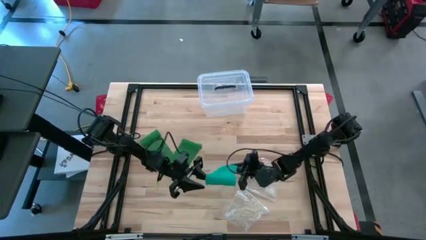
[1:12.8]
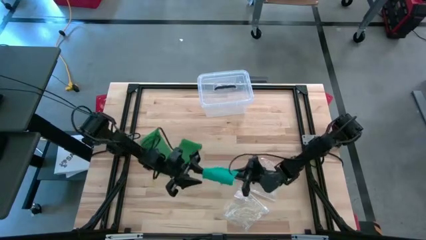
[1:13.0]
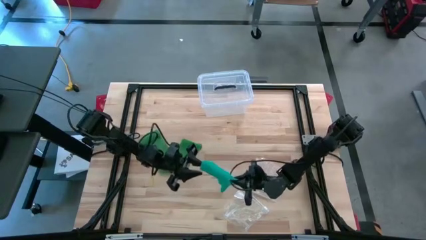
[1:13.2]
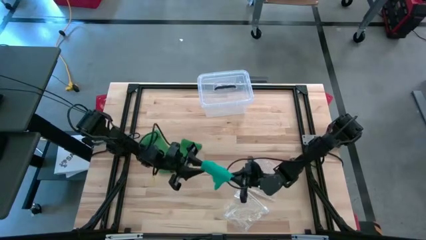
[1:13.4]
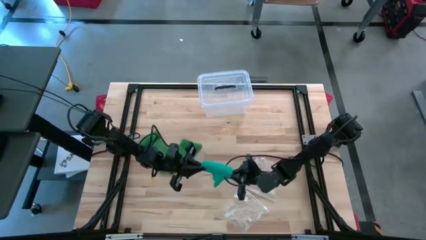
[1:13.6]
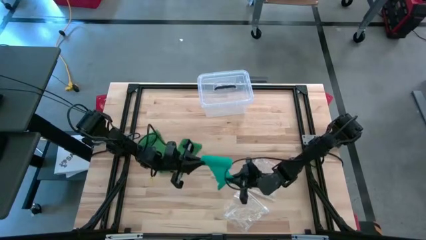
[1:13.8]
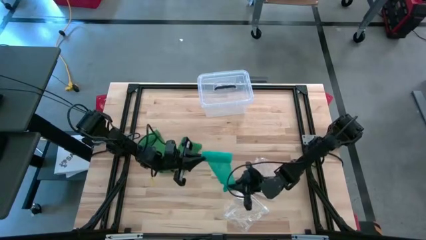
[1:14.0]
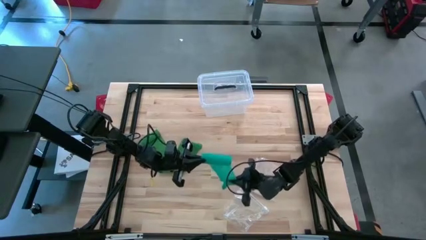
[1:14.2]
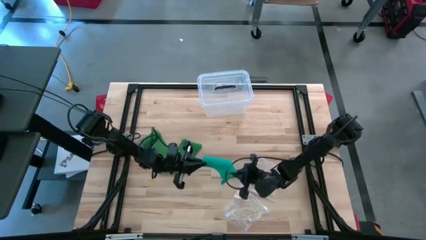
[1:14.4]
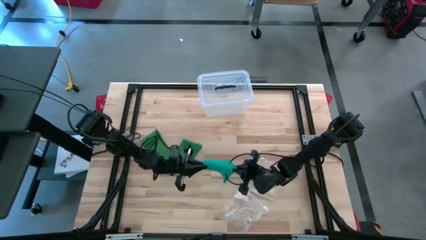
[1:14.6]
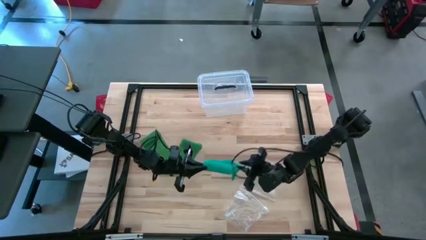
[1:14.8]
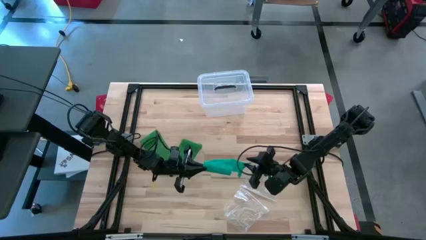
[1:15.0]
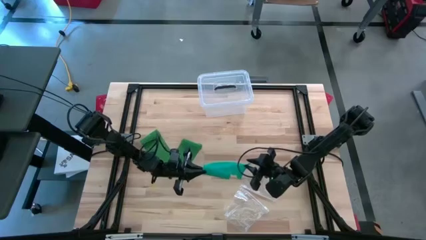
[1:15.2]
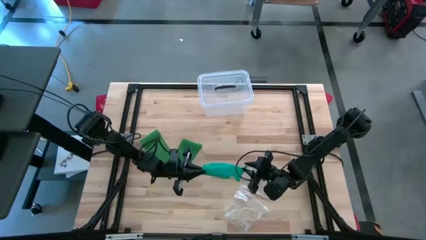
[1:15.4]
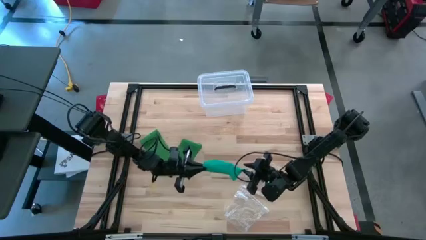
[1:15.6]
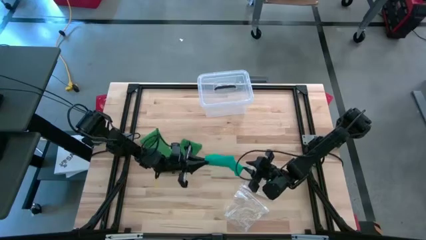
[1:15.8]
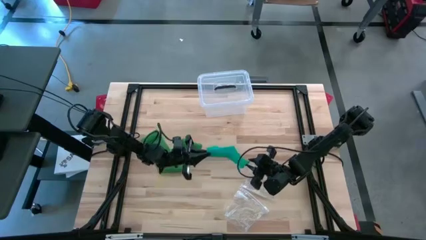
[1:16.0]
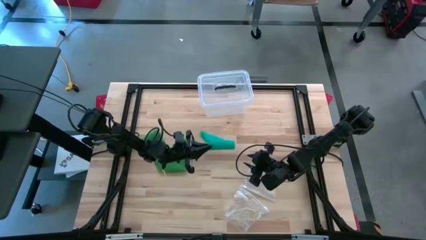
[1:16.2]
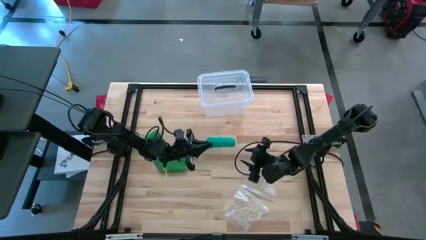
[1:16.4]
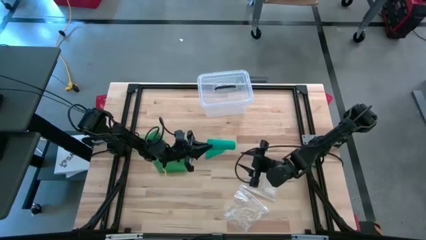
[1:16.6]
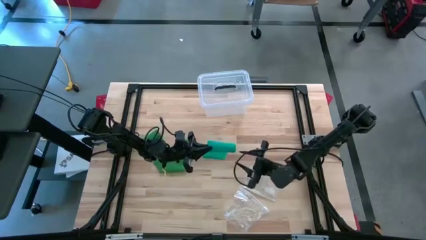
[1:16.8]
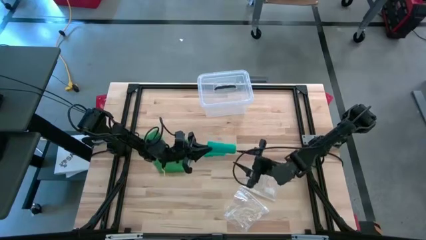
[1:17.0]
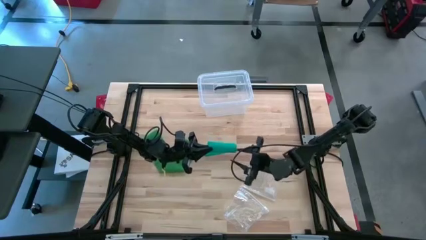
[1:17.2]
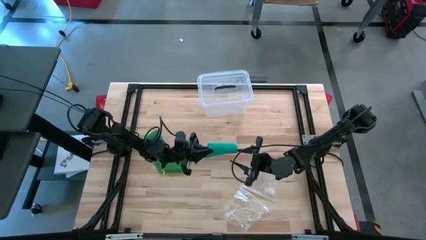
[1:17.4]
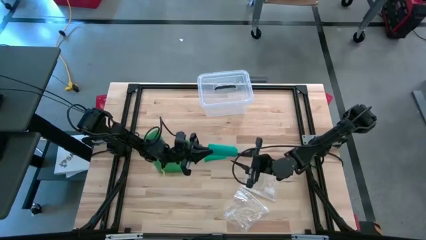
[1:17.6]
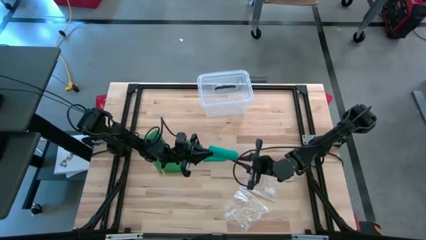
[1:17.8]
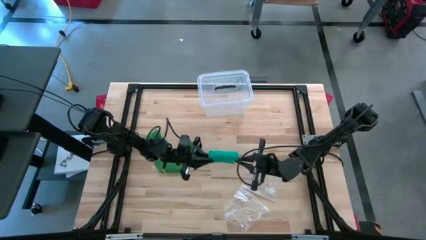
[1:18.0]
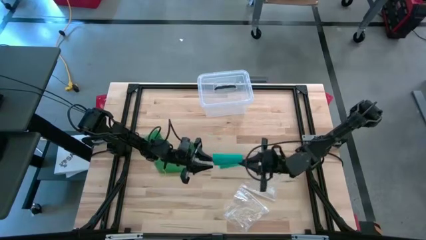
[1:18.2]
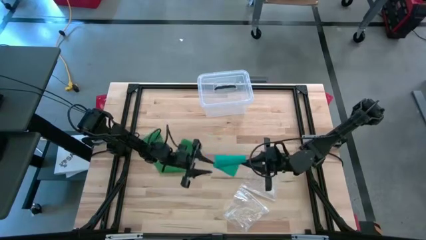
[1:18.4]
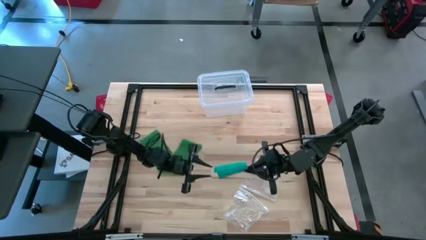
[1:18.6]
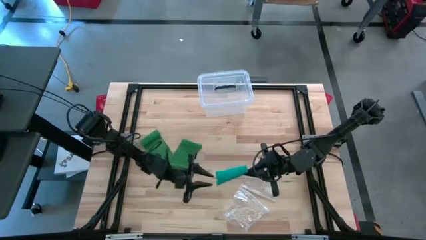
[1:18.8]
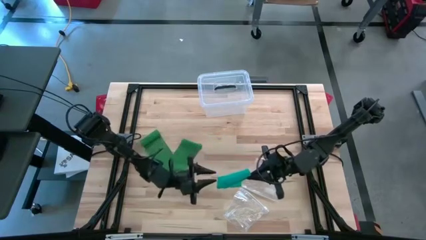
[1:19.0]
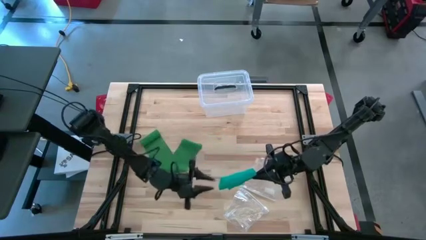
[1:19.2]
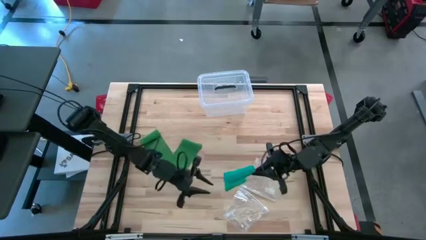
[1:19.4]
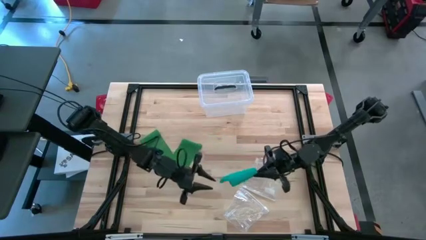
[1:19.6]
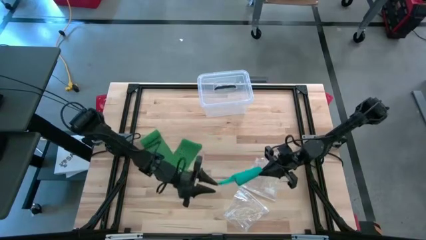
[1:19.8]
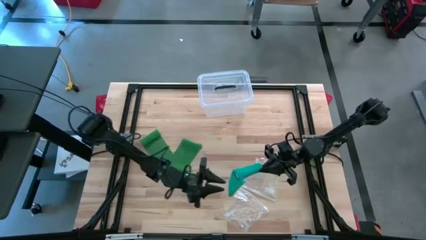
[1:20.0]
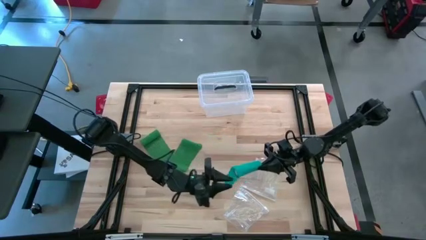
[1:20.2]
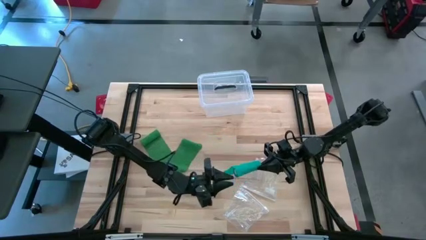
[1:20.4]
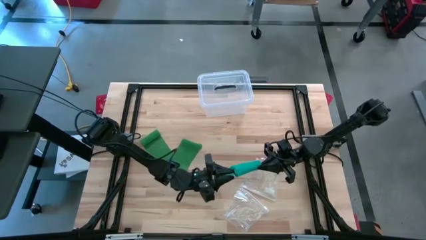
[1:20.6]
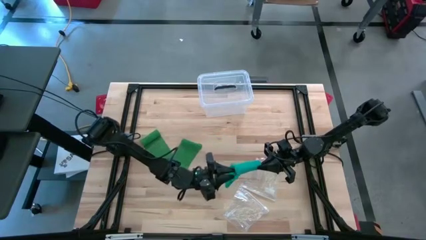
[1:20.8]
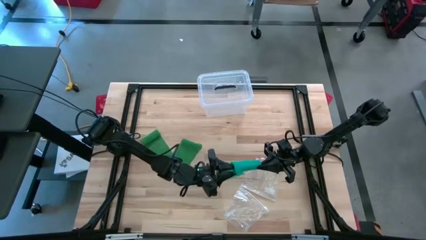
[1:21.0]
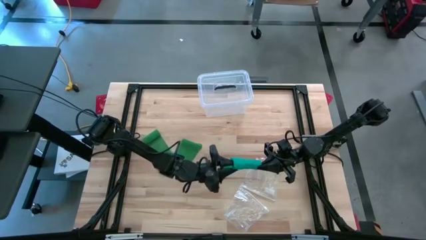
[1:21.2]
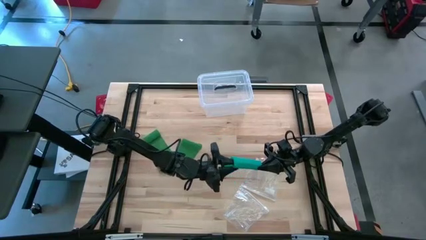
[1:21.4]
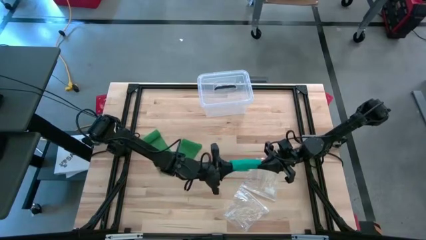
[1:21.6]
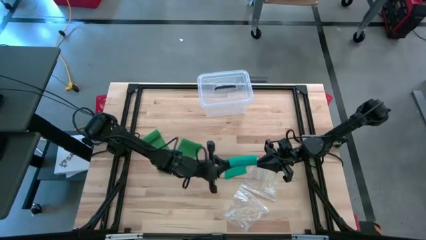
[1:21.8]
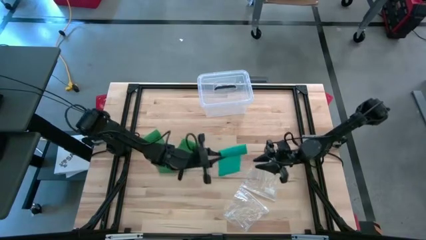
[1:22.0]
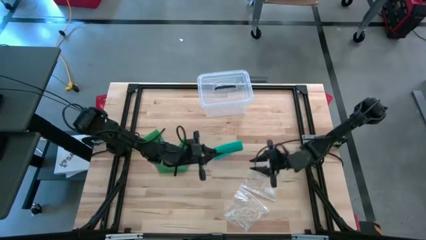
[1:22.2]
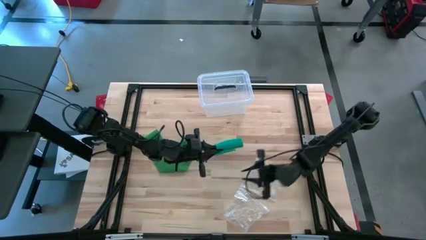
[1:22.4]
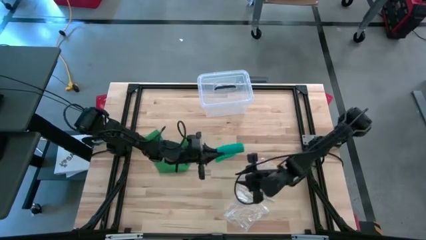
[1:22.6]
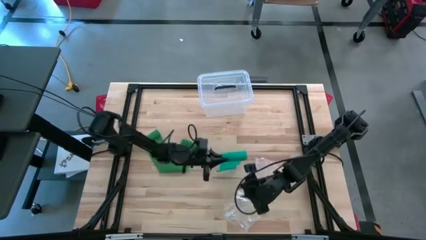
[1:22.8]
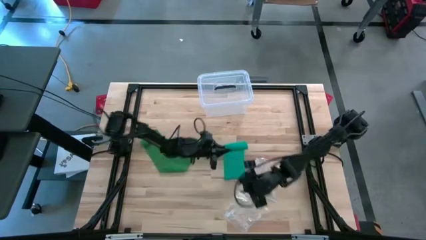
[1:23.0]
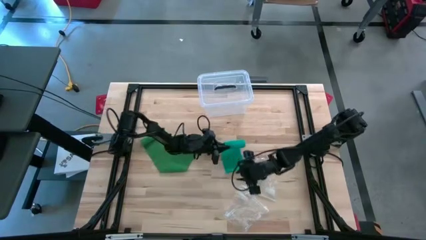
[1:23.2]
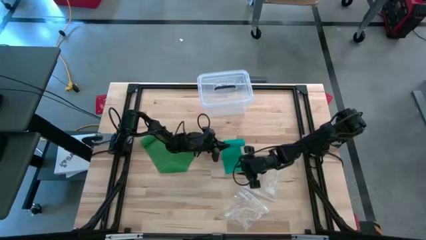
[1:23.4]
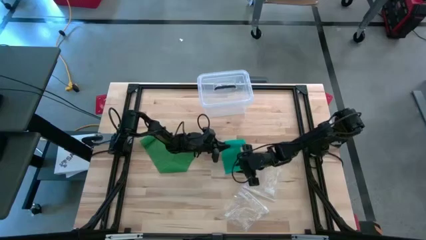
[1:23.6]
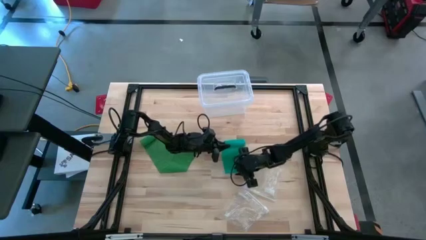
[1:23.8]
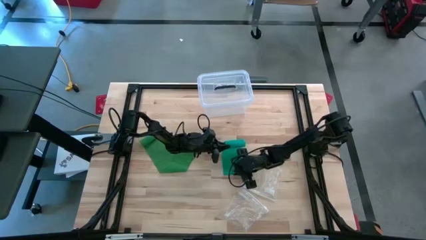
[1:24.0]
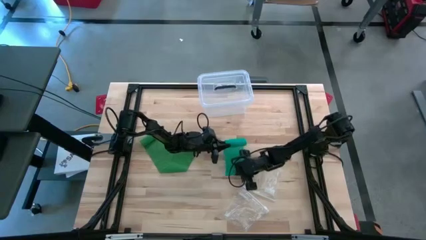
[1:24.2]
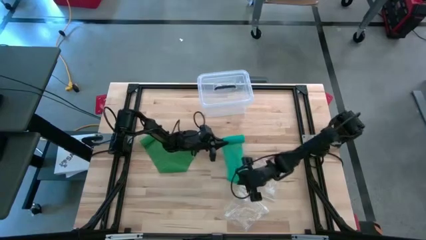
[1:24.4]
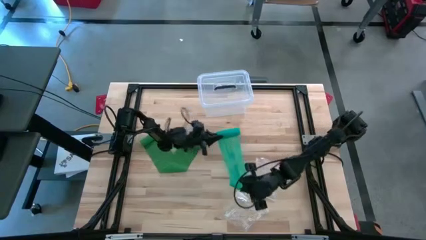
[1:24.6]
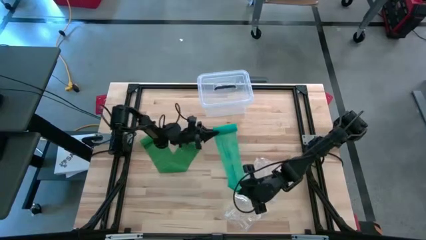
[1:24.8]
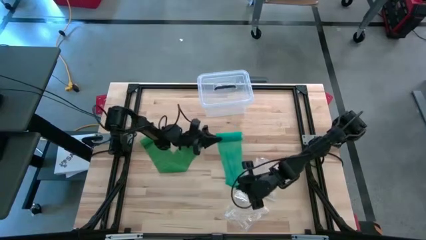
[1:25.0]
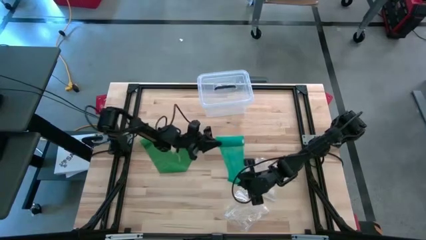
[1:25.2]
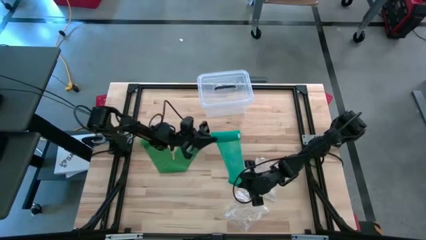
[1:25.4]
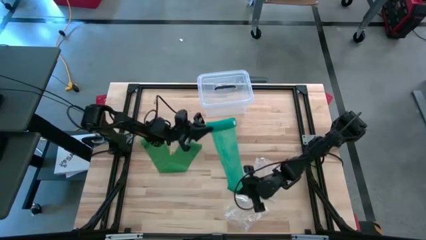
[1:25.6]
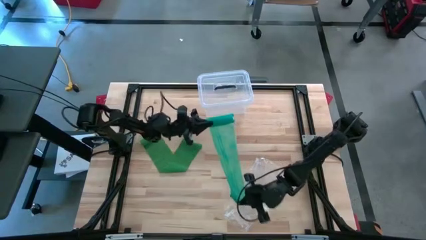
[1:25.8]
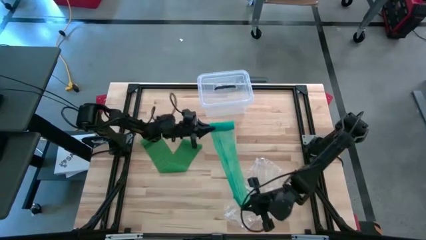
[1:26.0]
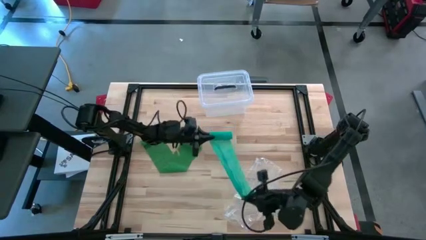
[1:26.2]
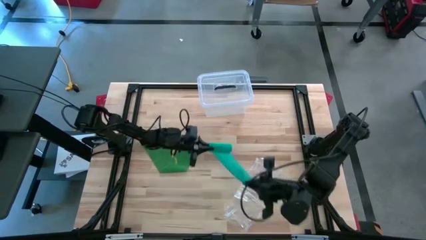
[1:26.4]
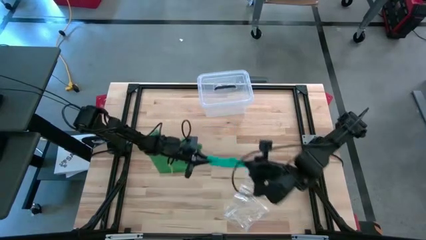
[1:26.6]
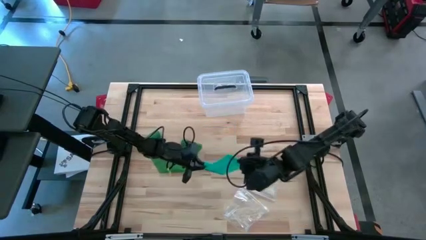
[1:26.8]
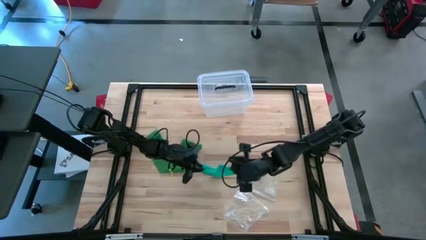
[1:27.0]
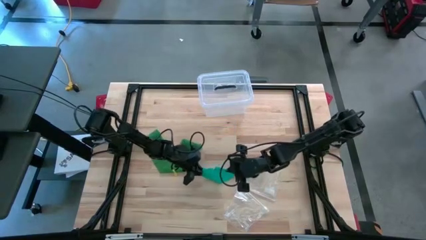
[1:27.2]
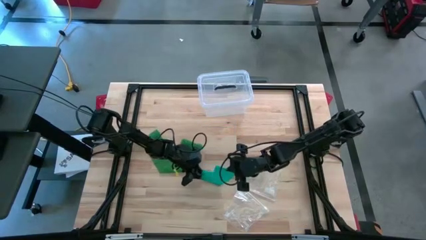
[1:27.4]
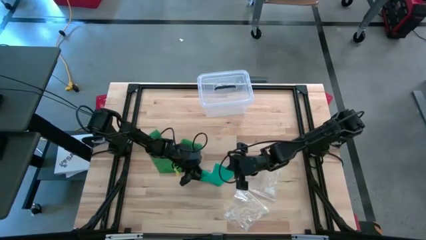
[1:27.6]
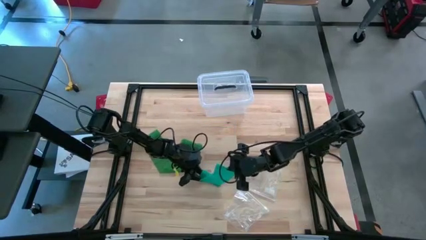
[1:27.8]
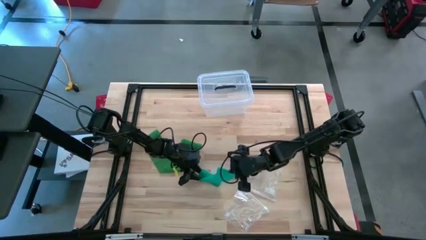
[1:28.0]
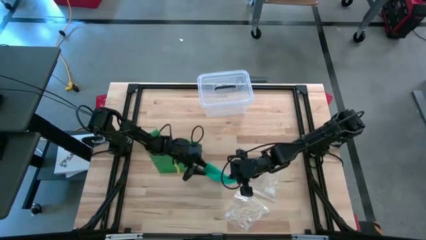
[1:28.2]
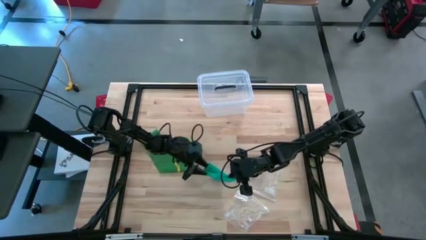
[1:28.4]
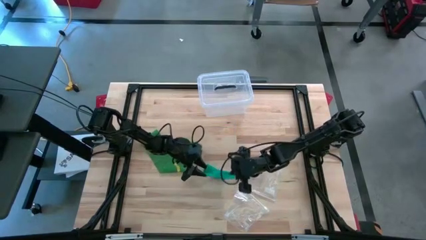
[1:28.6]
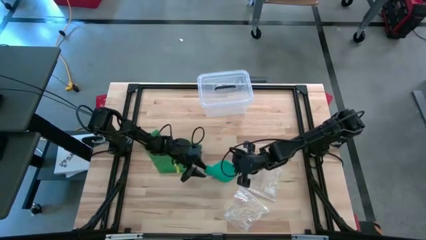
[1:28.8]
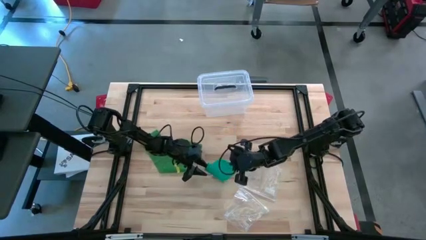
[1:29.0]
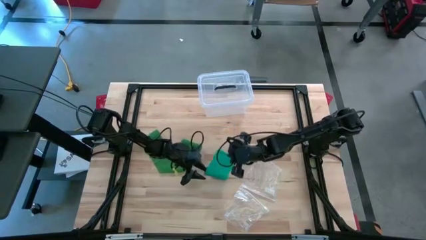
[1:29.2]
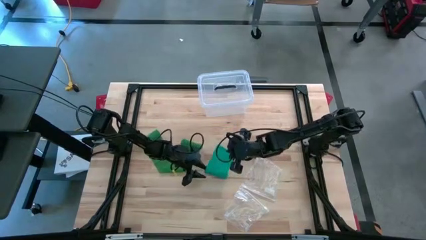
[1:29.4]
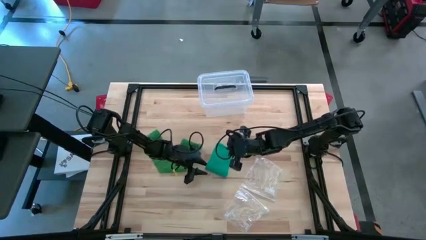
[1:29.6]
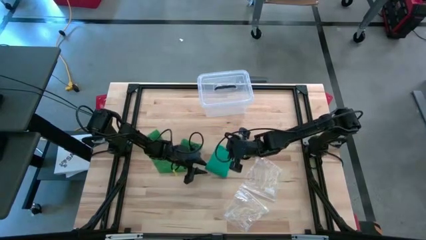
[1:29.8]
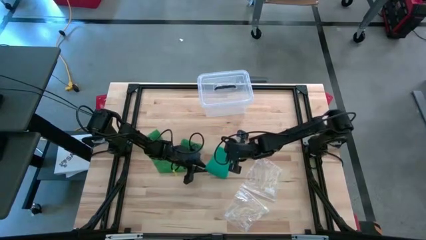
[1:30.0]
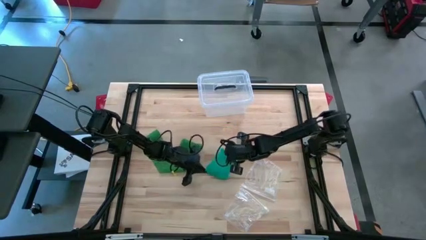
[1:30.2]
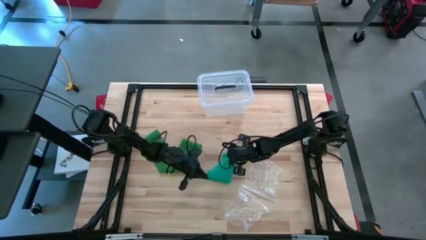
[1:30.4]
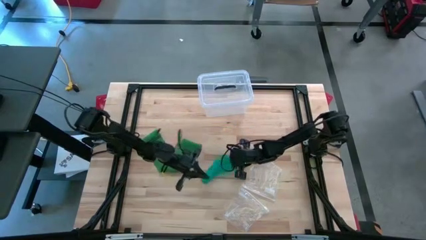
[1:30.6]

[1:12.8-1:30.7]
Task: Roll bandage
Roll the blue bandage
